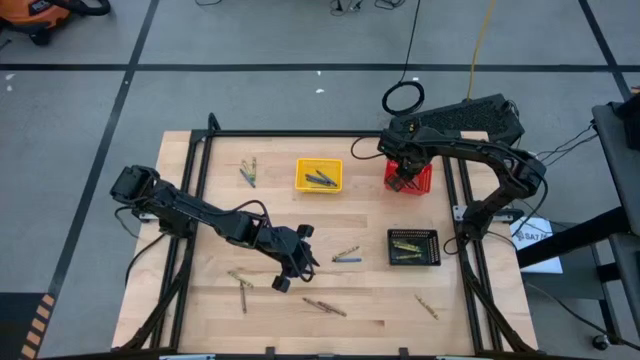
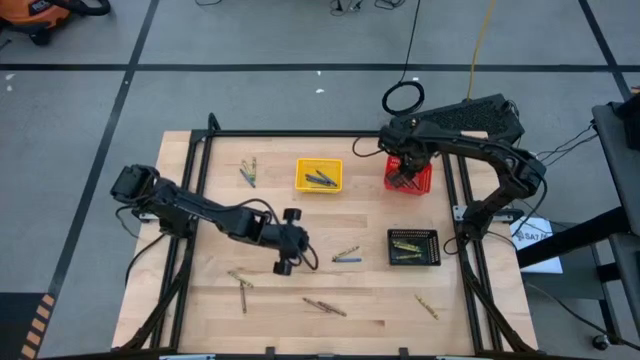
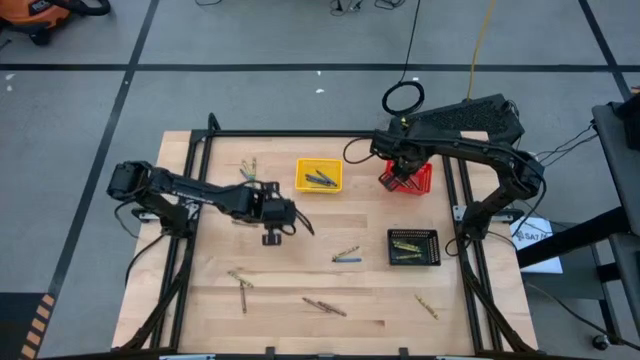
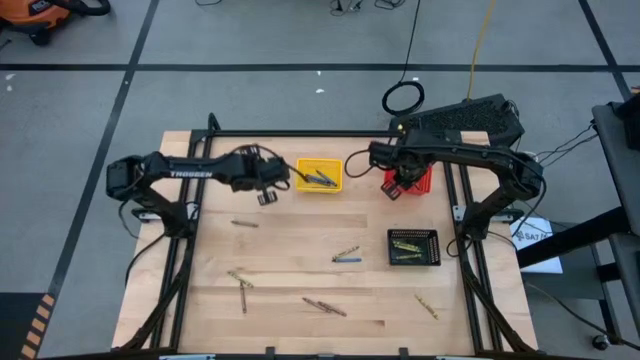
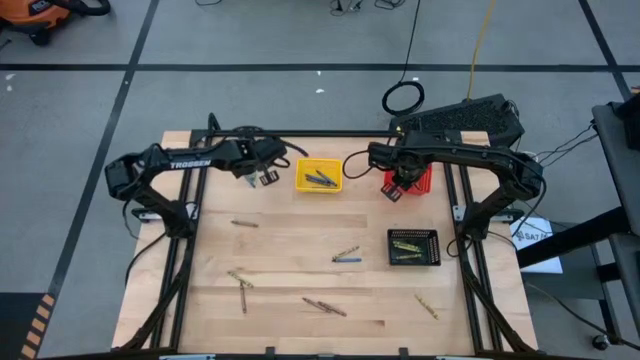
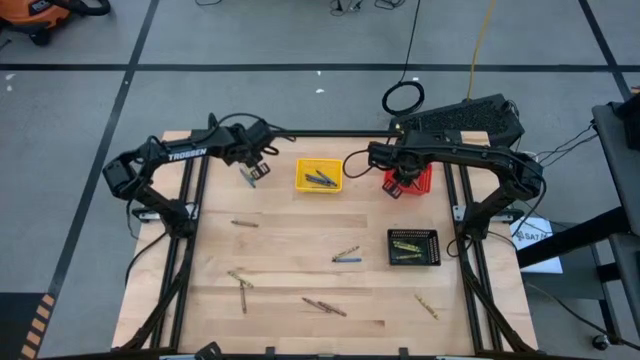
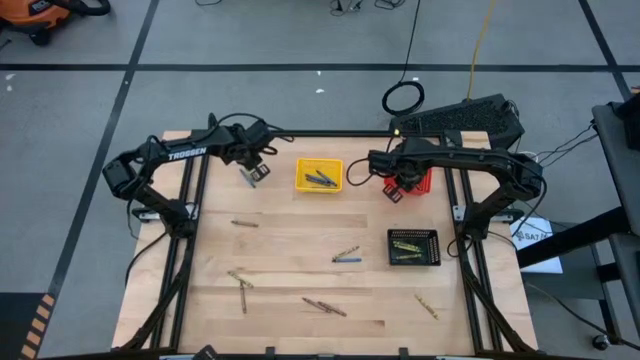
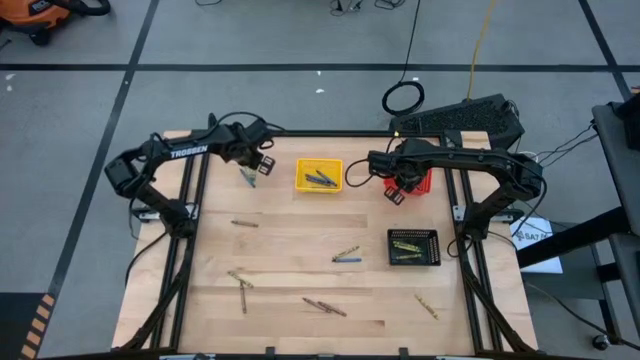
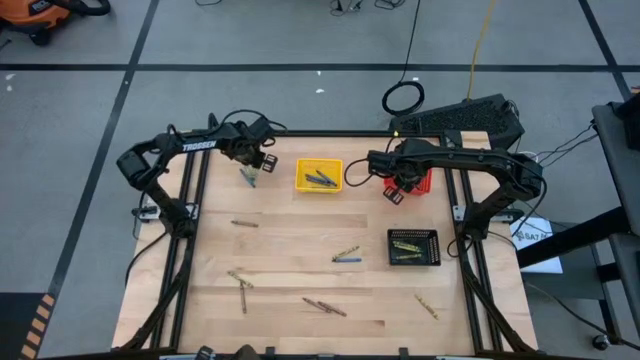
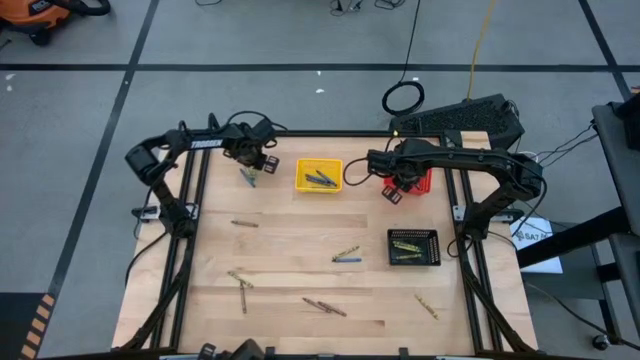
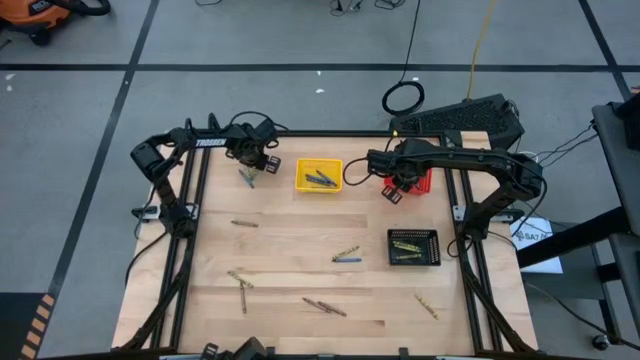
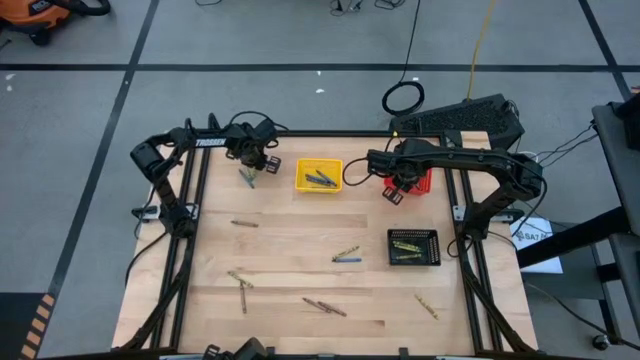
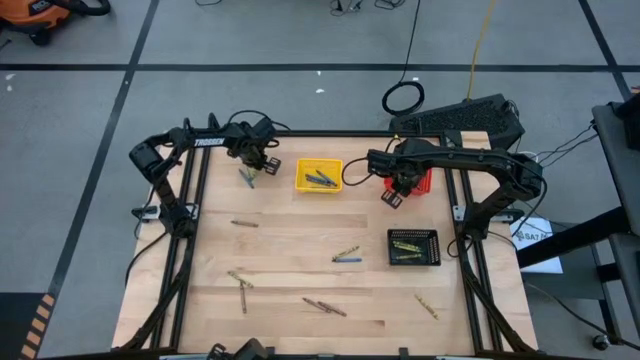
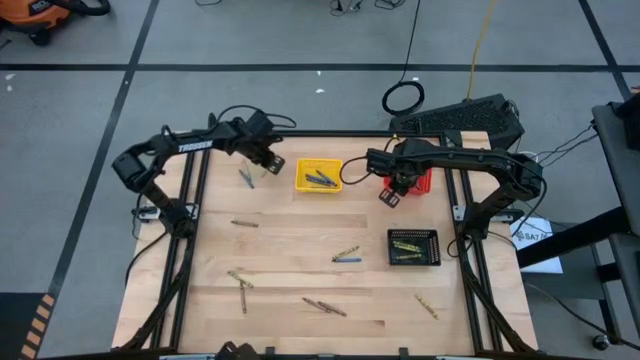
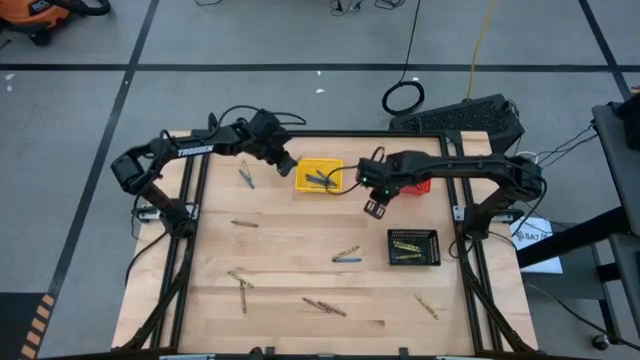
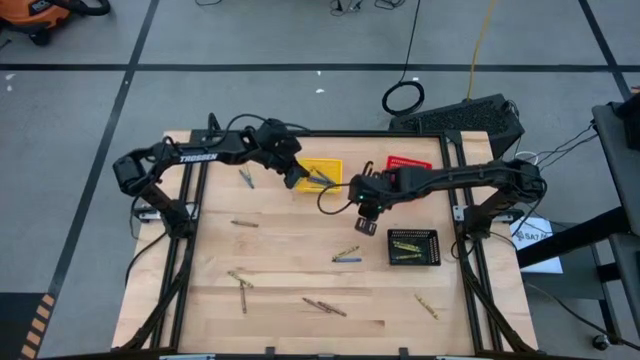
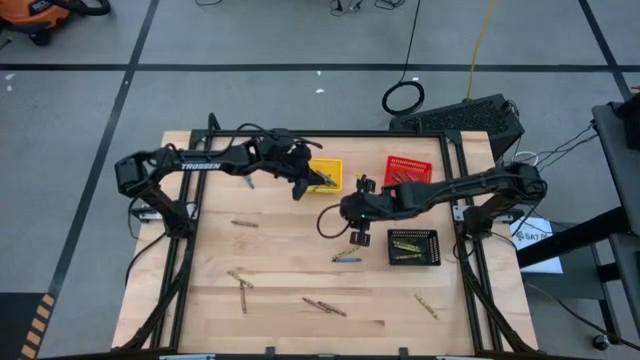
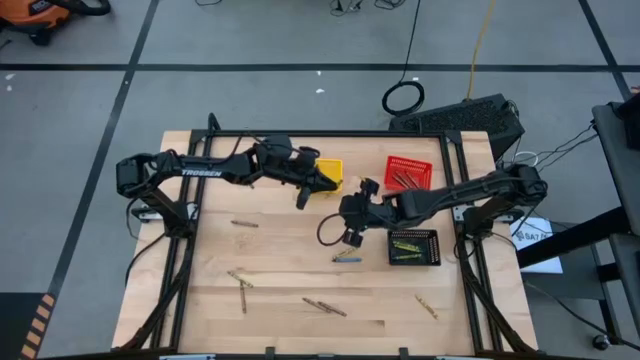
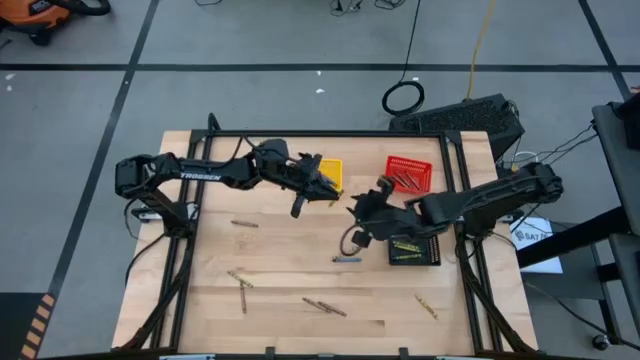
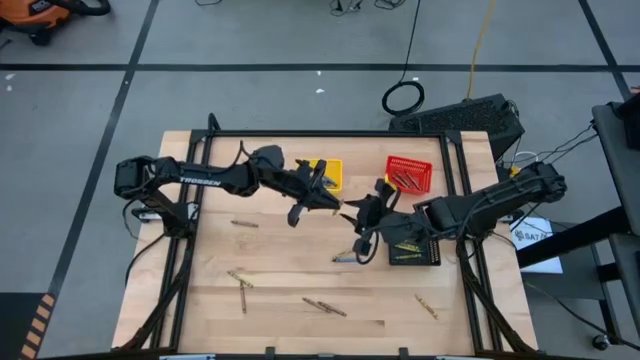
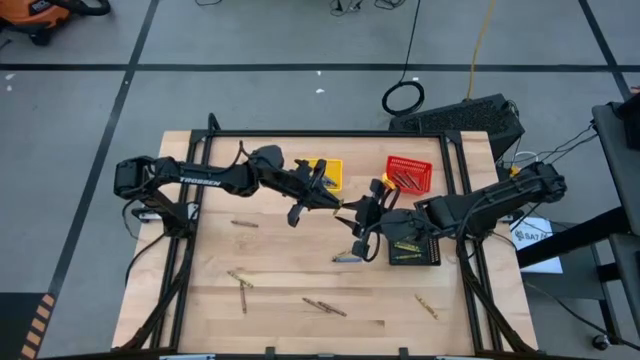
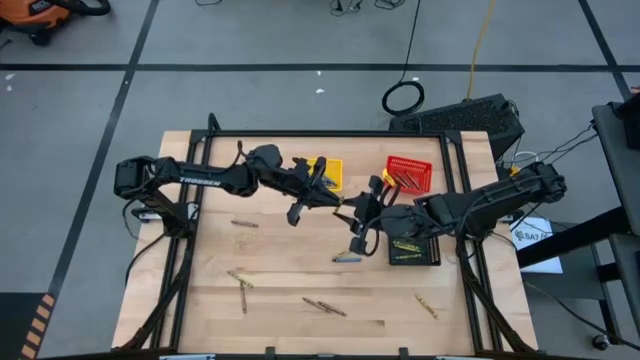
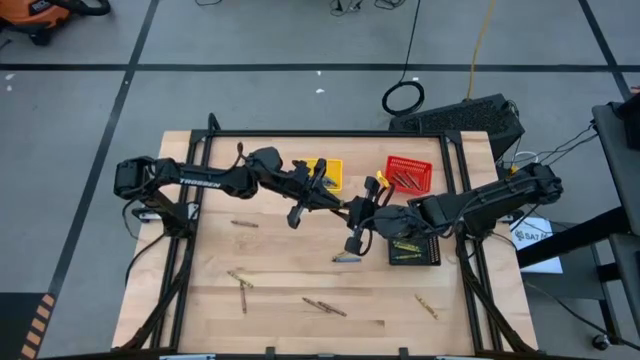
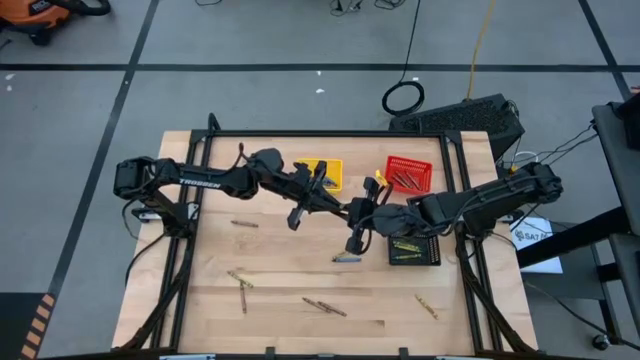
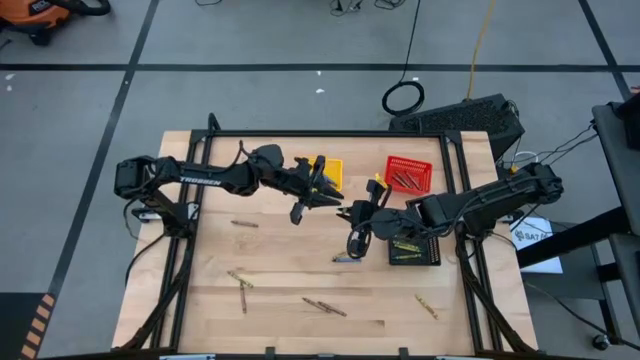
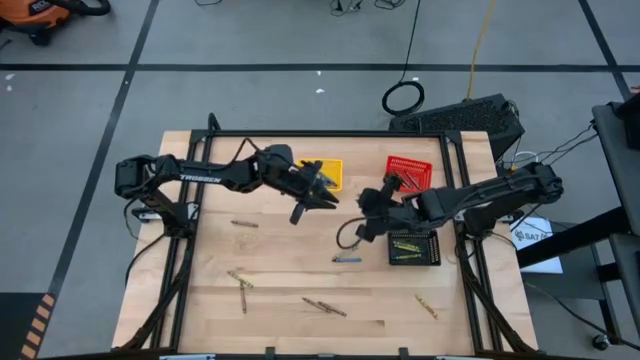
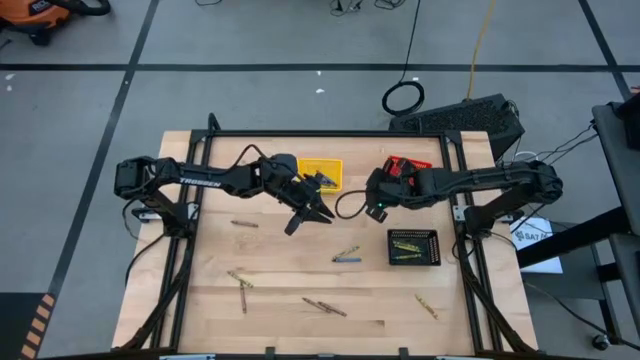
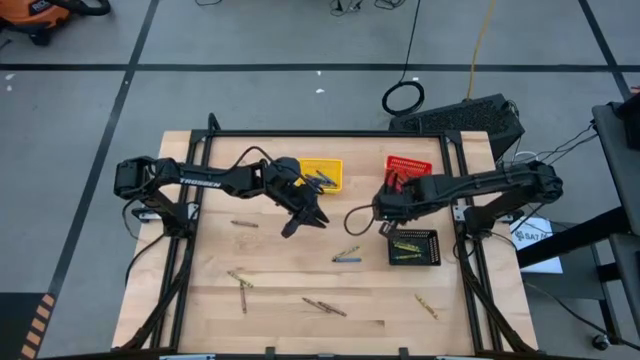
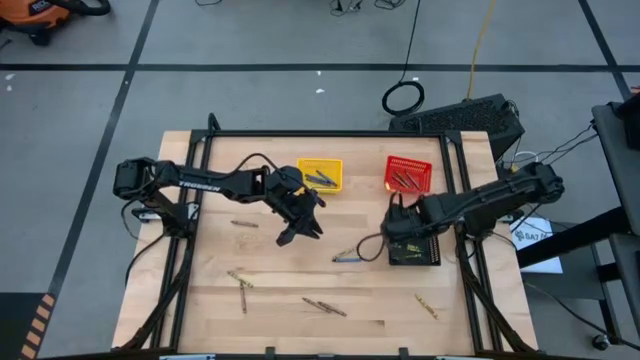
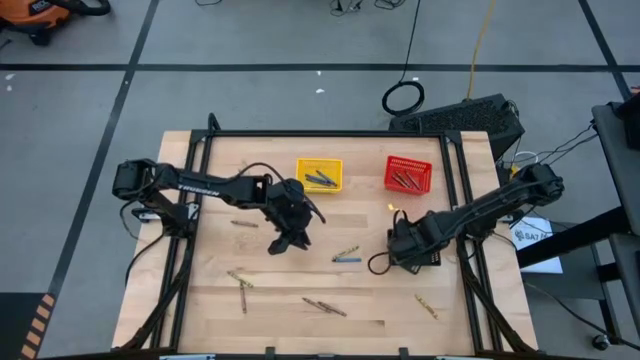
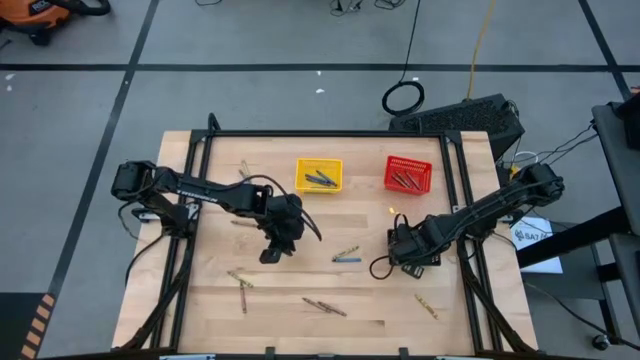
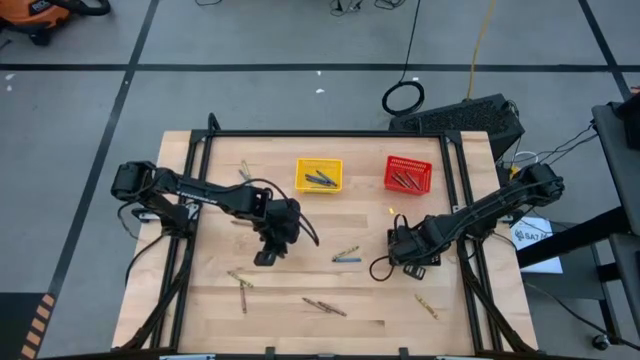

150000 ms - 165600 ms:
Task: Sort crayons
Put the green crayon into the black bin

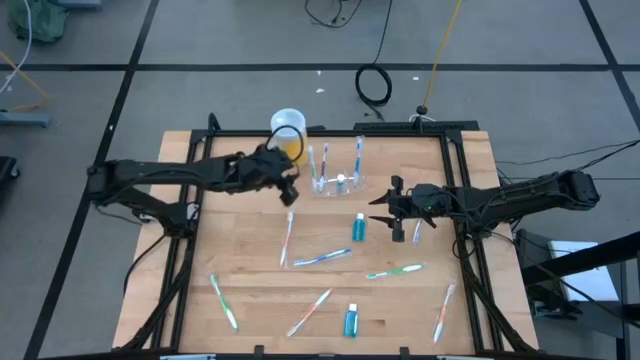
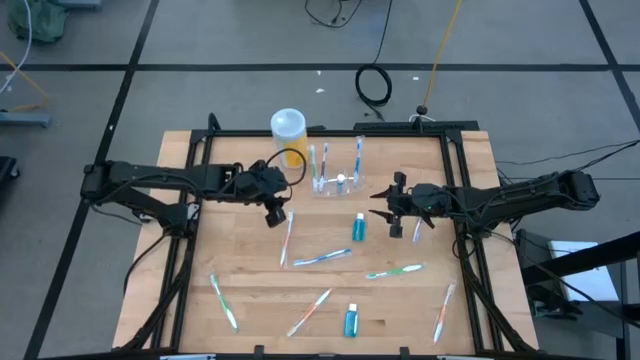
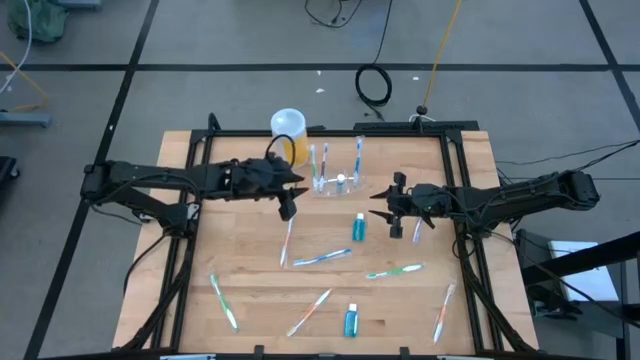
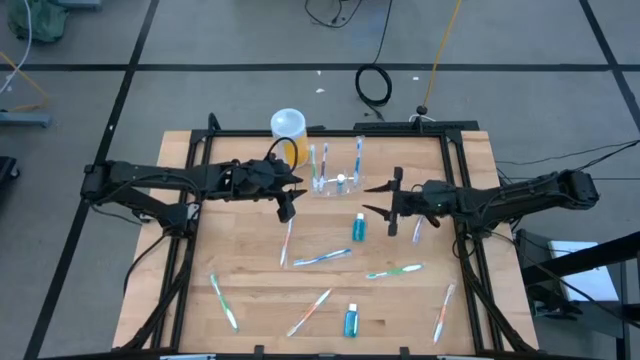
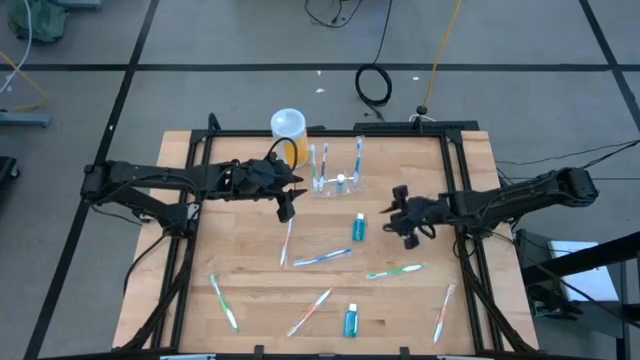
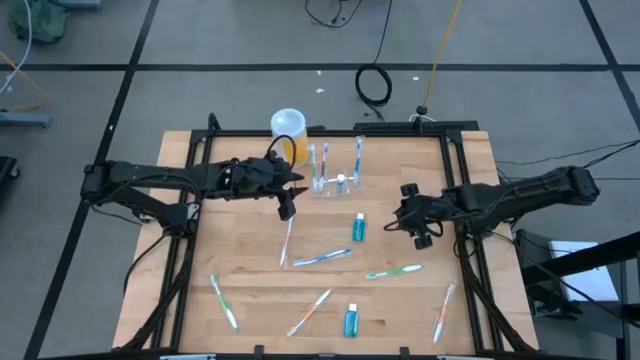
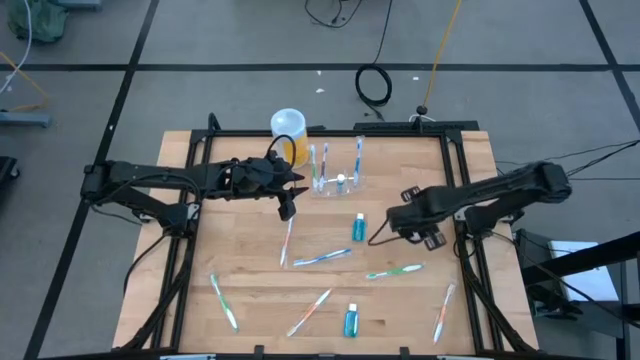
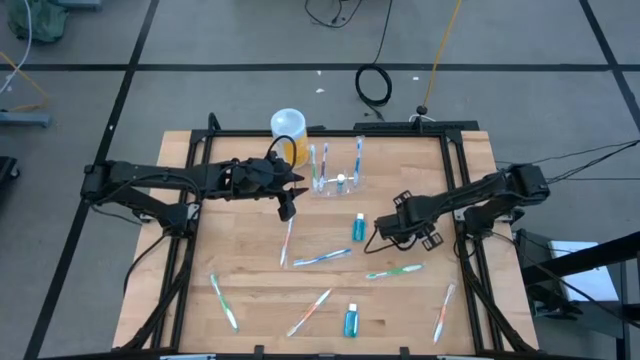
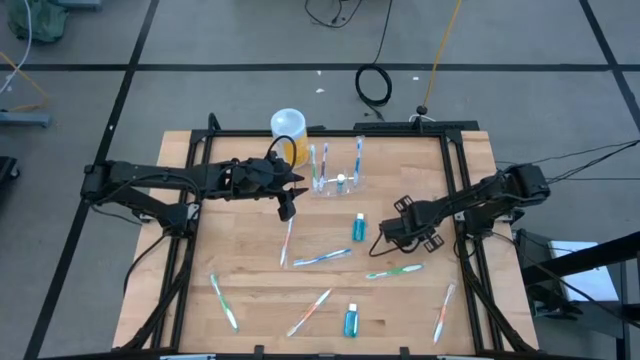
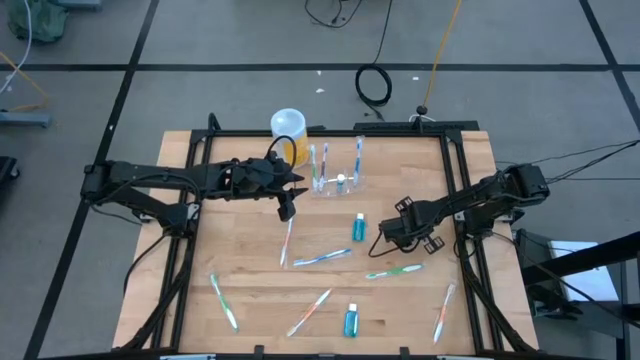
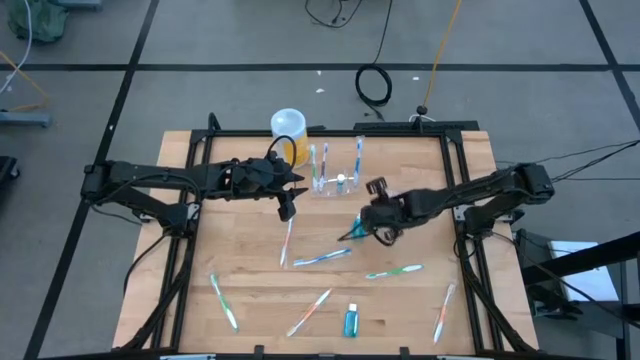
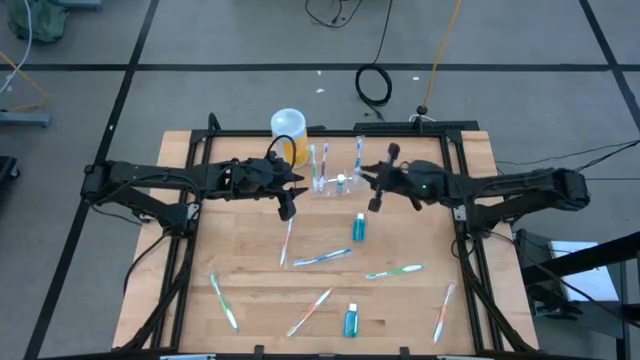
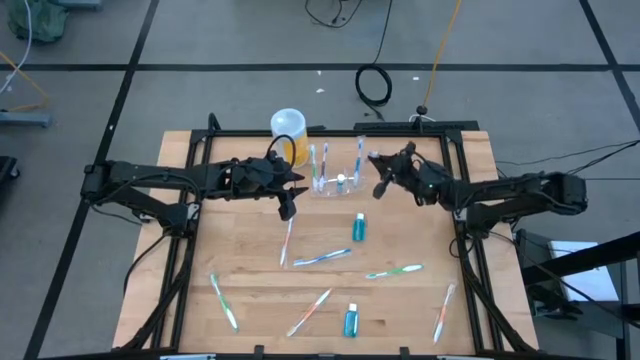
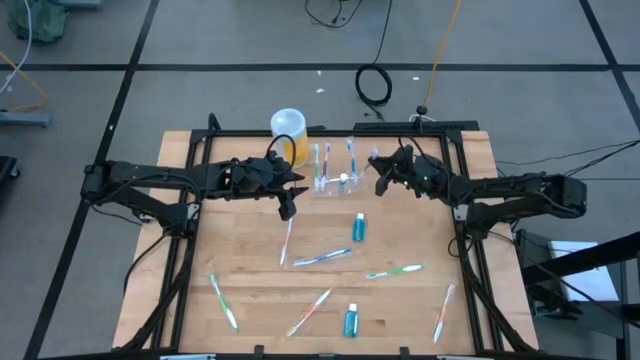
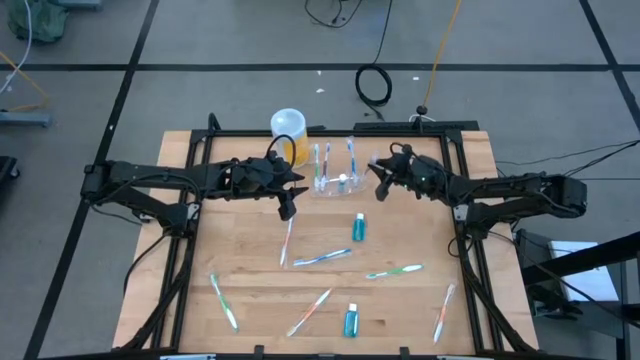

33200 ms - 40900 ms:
Task: Pick & Place toothbrushing station
Put the purple toothbrush into the transparent organizer
